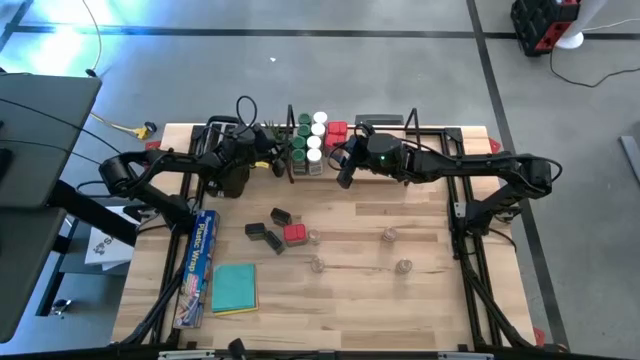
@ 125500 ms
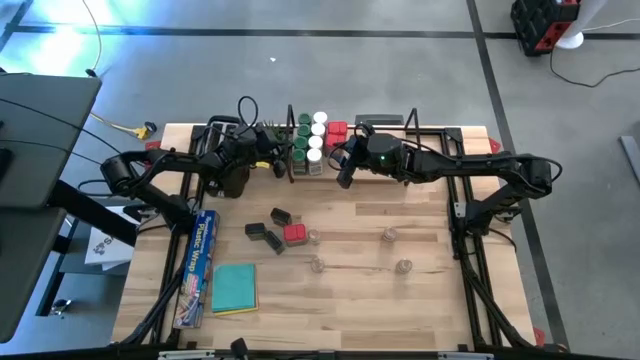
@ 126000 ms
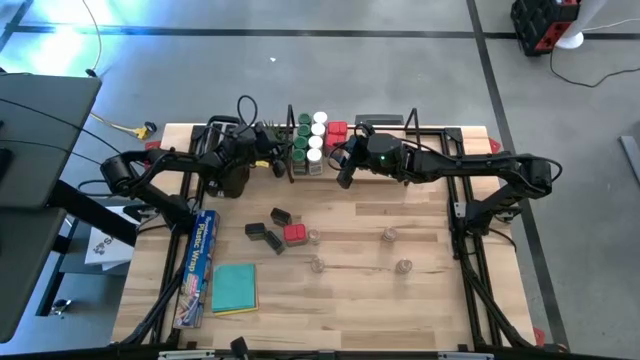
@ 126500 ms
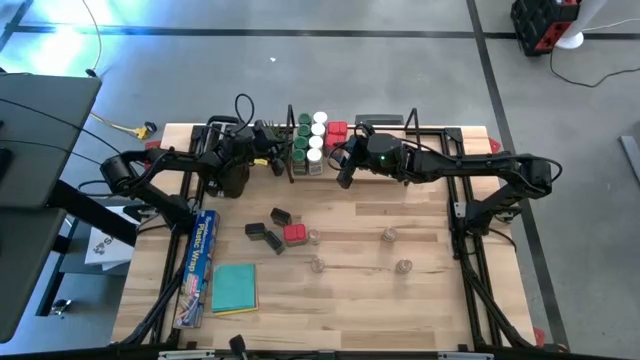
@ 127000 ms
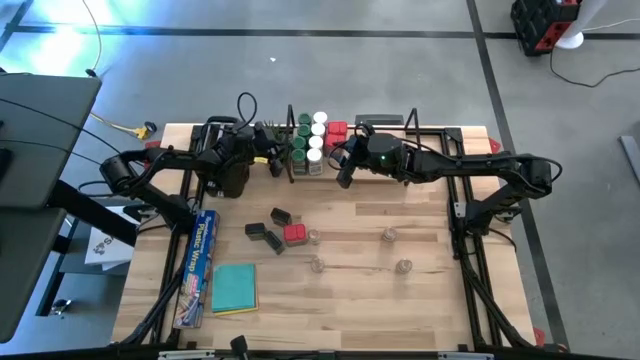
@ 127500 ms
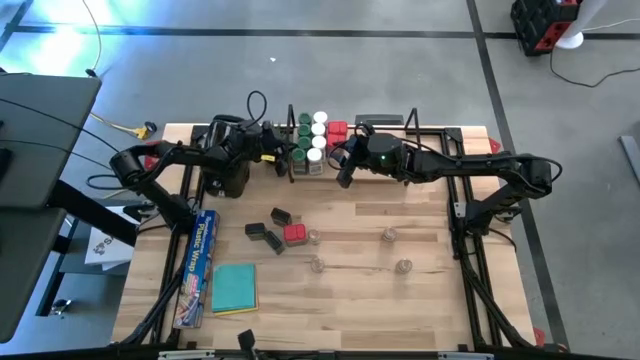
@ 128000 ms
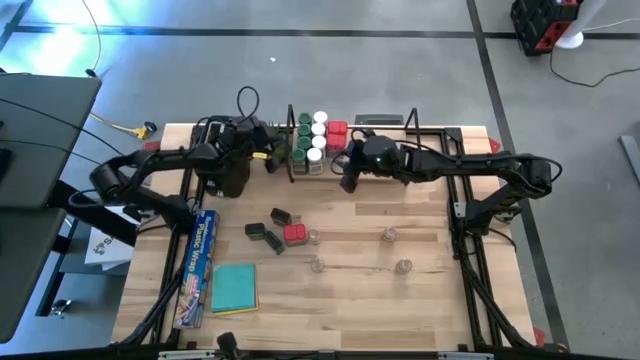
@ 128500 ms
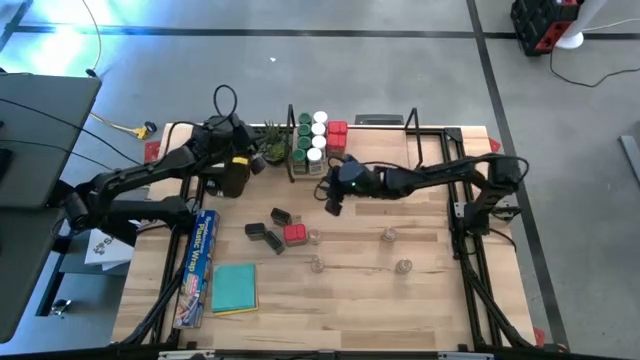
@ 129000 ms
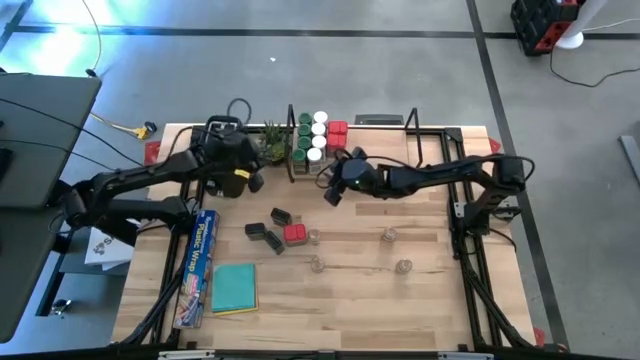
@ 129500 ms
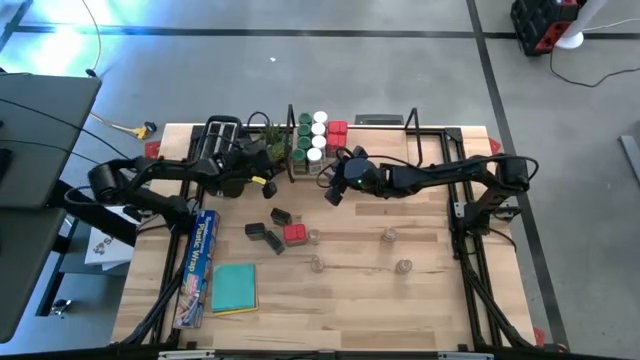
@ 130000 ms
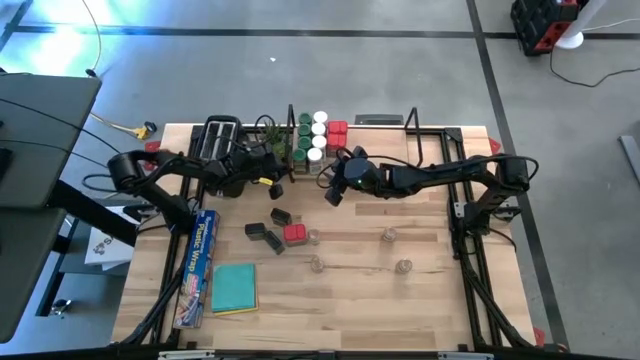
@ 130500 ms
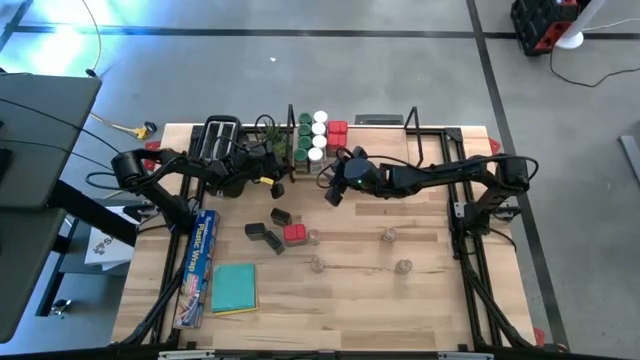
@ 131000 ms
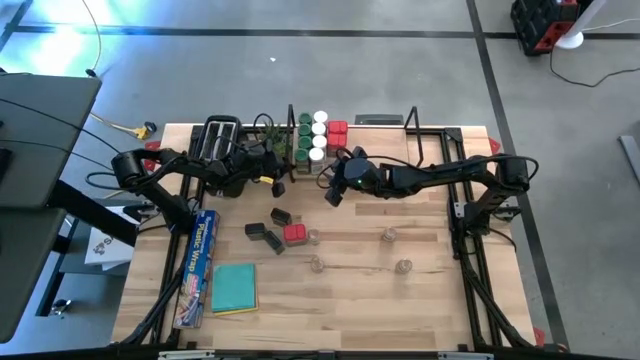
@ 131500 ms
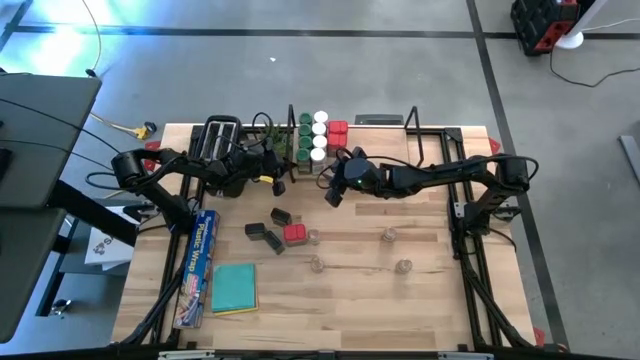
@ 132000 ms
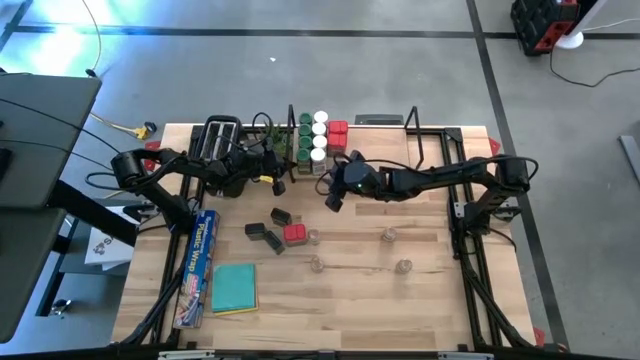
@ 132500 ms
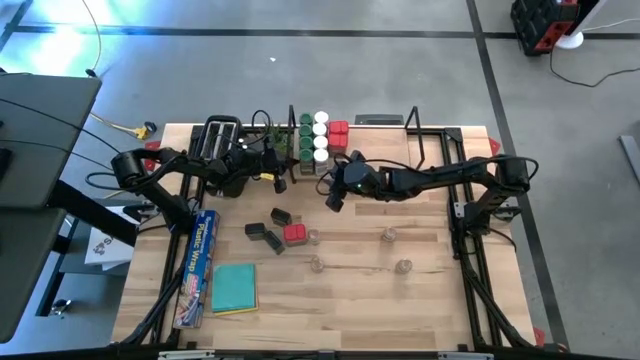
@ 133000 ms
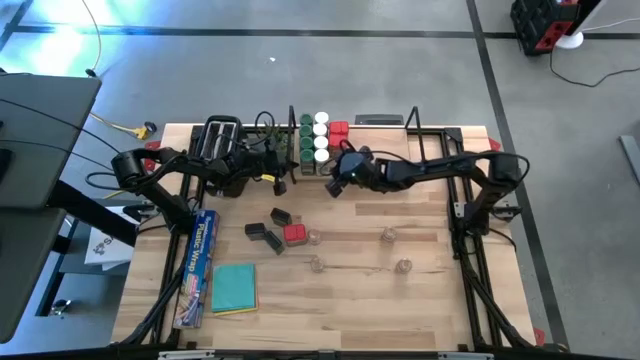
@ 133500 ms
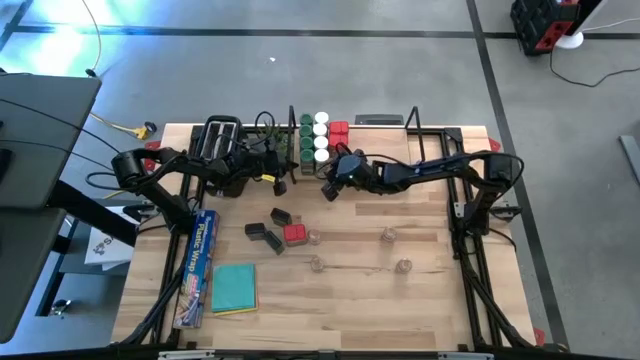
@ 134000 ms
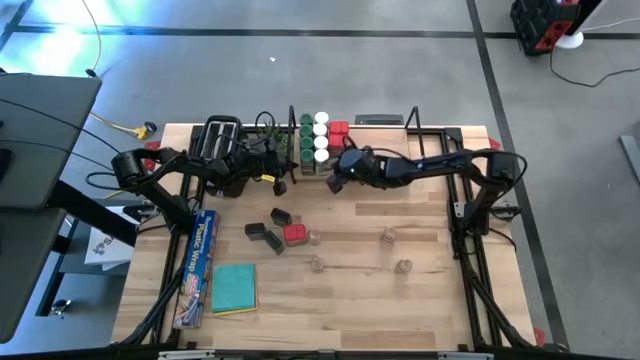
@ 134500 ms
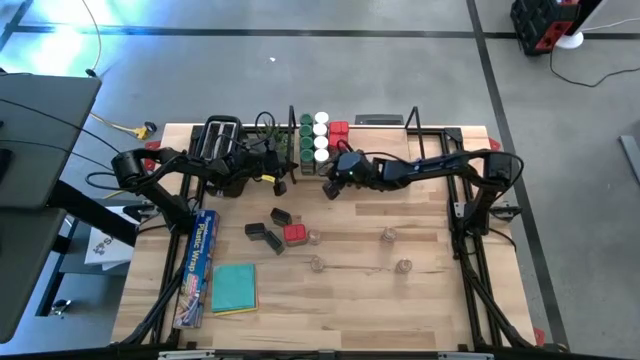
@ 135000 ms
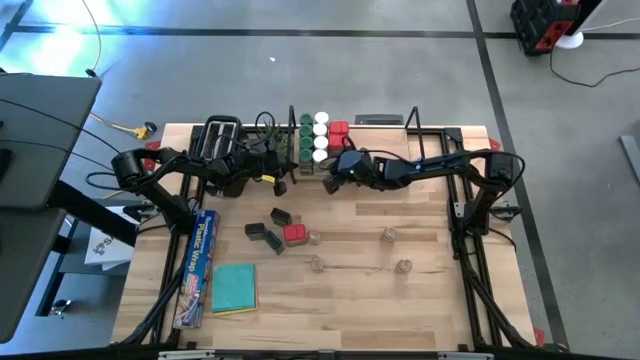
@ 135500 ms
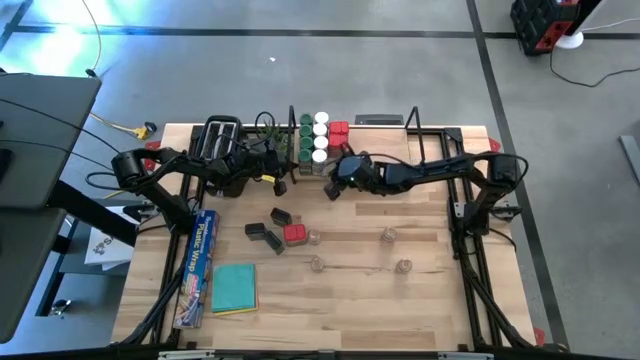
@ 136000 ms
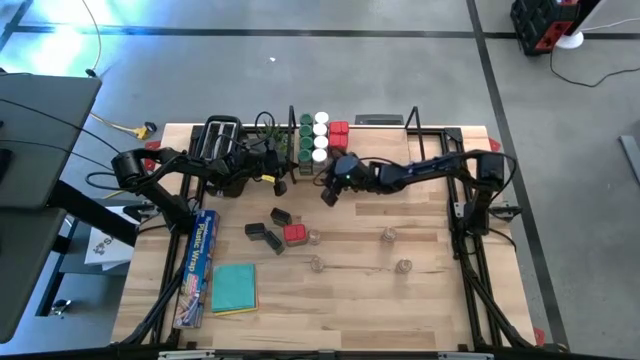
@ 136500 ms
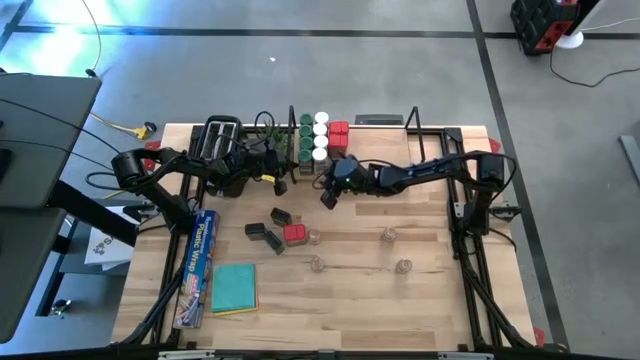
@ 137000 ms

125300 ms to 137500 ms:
Task: Shelf spices
Put the bottom red seasoning can on the shelf aligned with the other red seasoning can

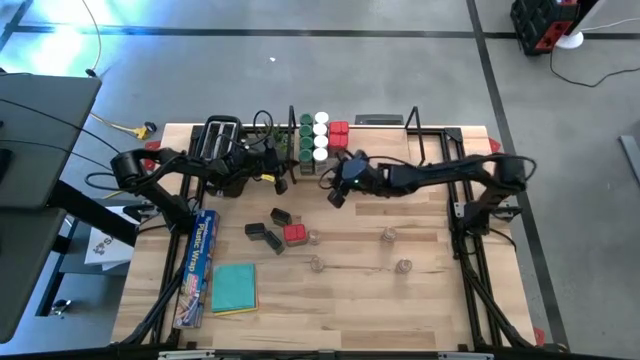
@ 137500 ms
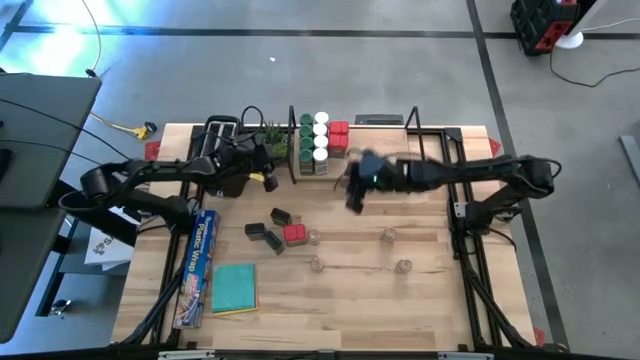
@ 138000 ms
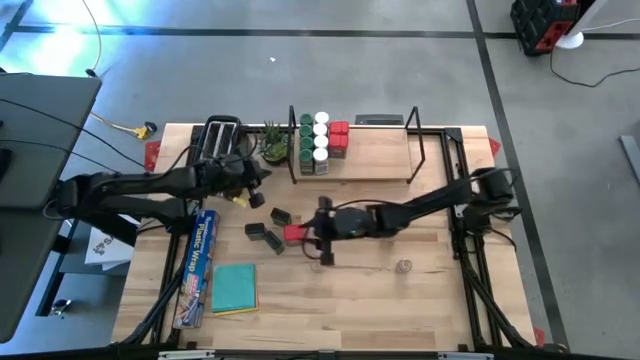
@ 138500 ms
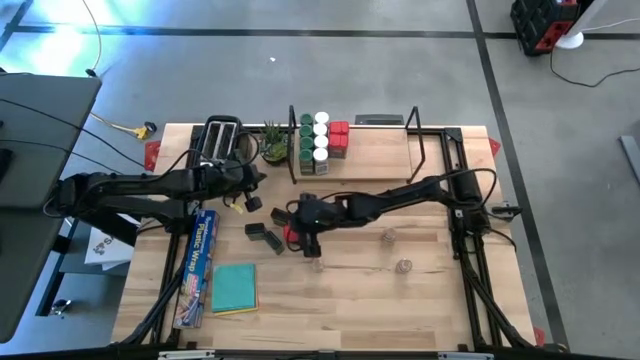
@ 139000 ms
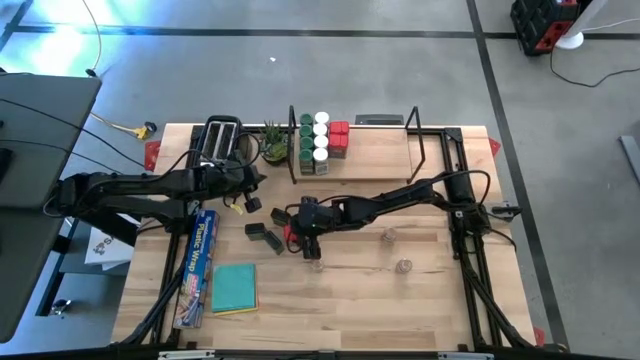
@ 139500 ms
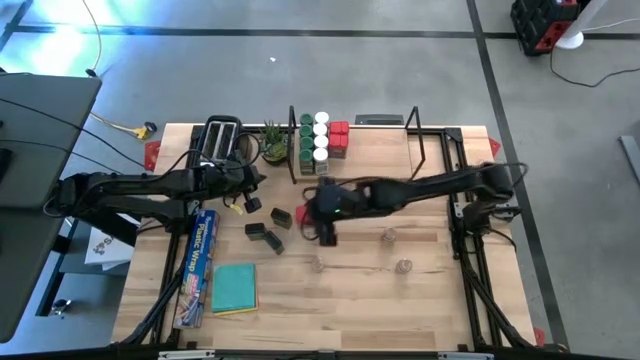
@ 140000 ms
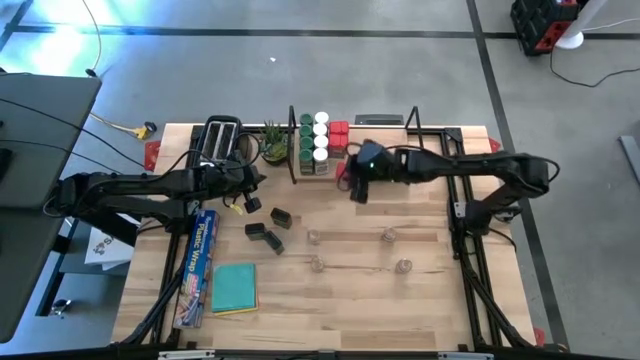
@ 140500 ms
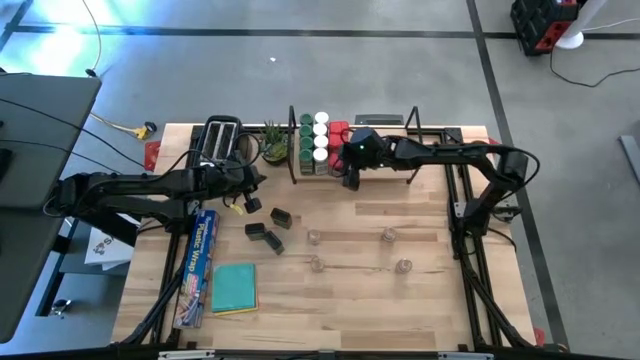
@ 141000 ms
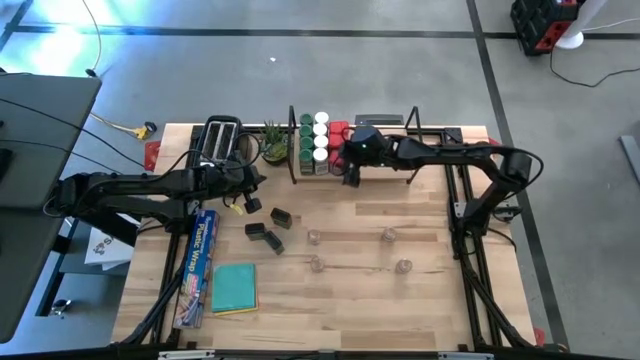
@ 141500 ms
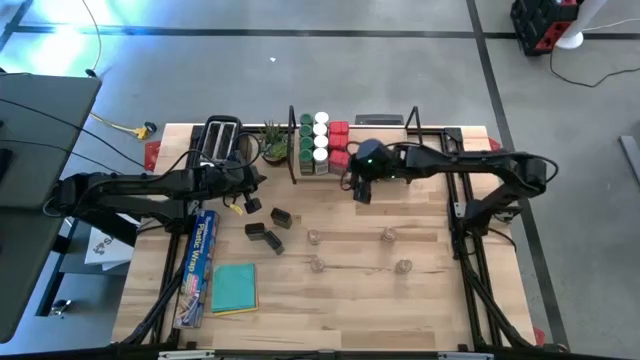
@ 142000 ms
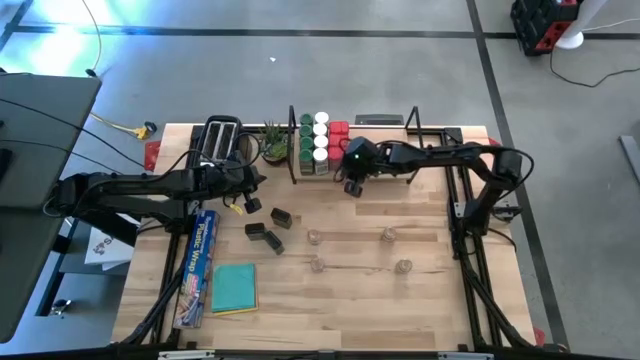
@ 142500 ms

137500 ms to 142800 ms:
Put the red seasoning can on the shelf aligned with the other red seasoning cans

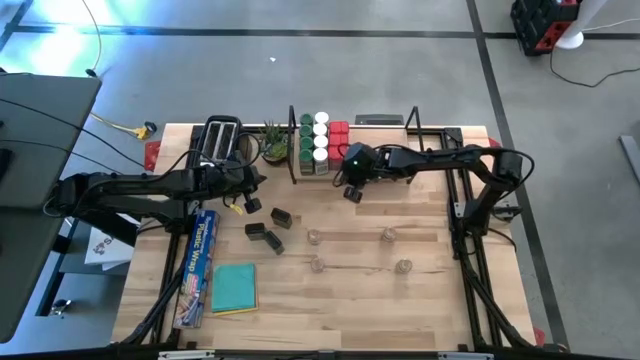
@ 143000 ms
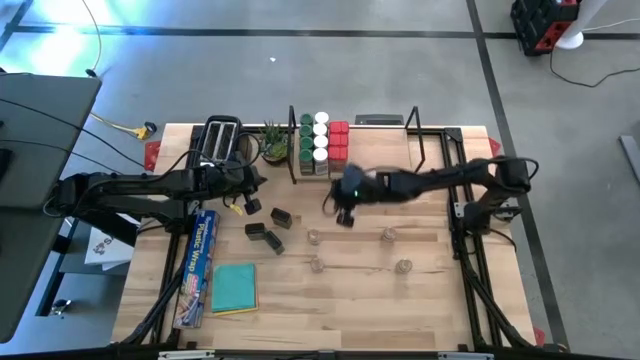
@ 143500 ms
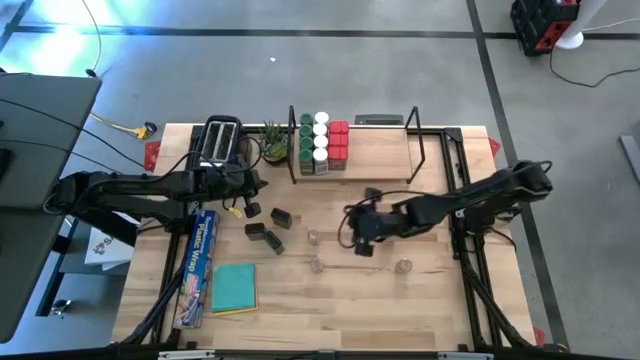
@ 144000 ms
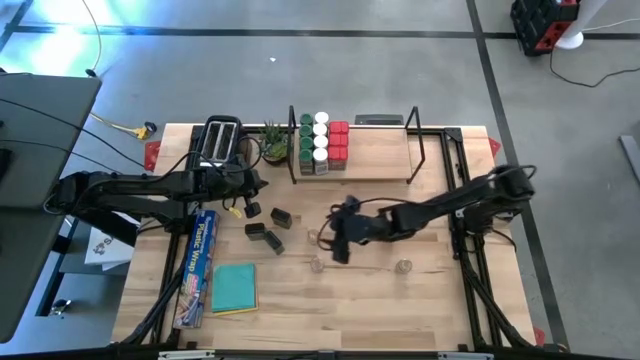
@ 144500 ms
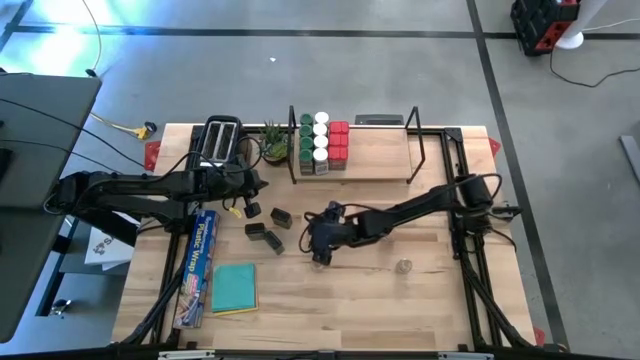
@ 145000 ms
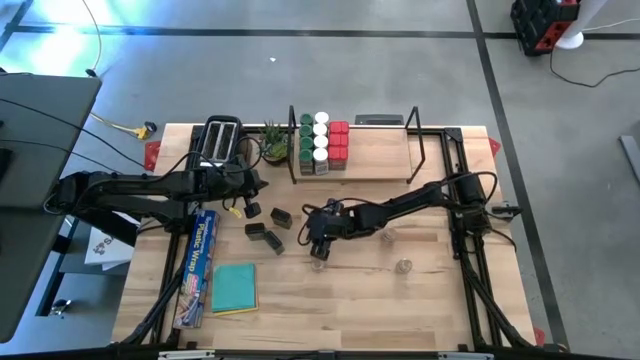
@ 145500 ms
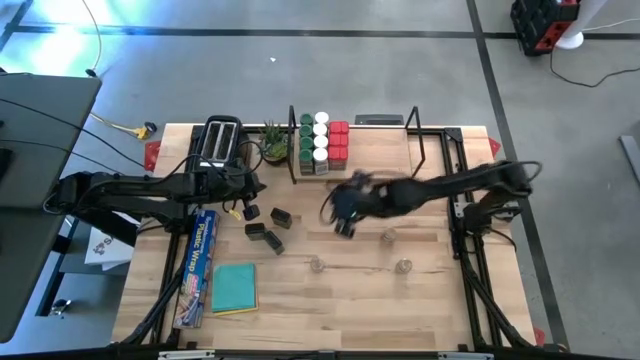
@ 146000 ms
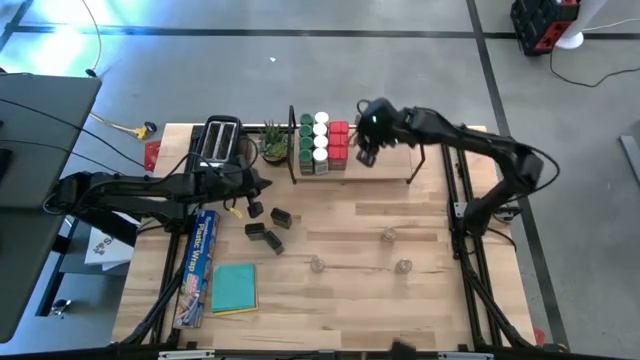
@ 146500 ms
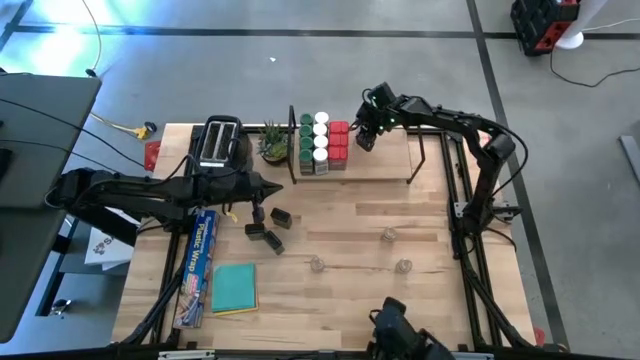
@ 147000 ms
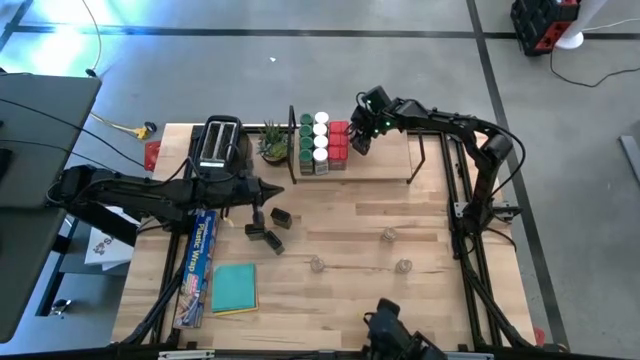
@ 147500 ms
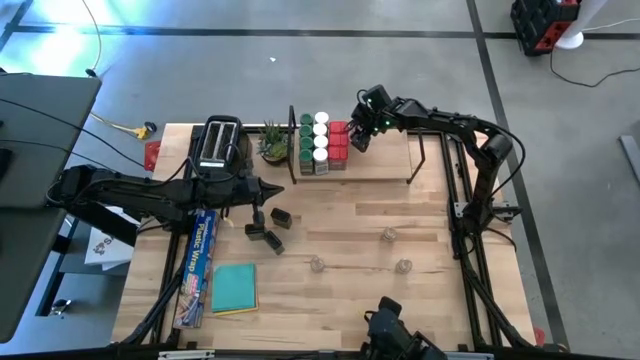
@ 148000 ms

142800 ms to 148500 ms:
Put the top left brown seasoning bottle on the shelf
